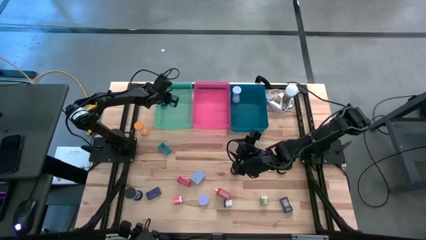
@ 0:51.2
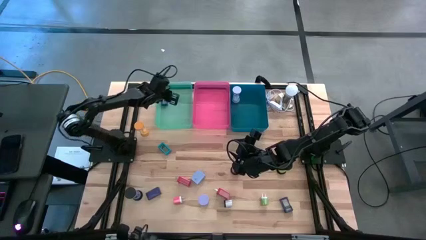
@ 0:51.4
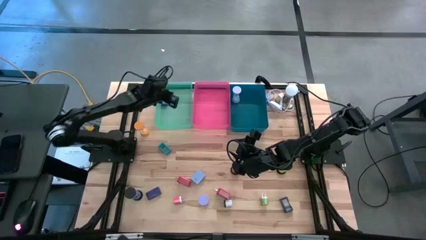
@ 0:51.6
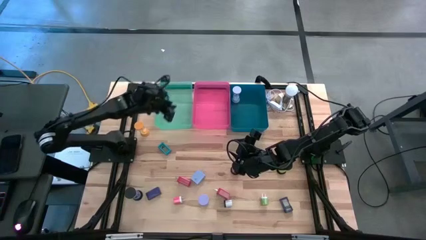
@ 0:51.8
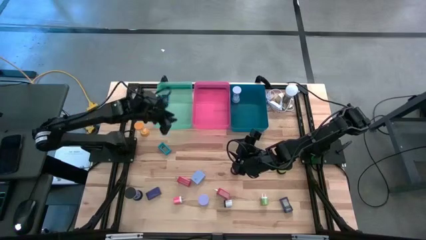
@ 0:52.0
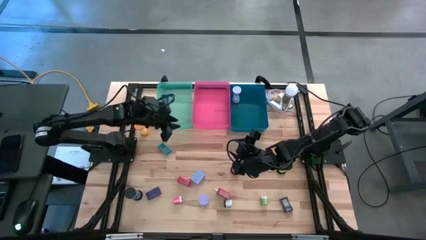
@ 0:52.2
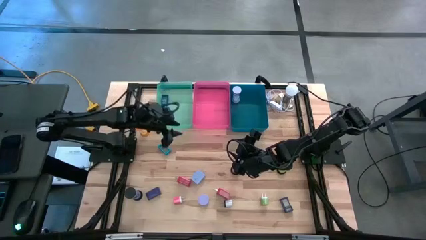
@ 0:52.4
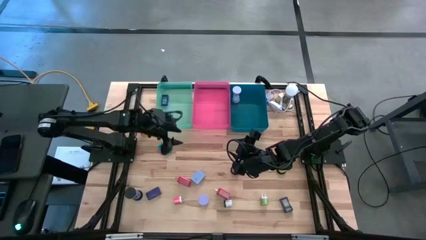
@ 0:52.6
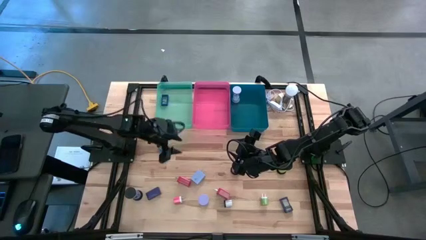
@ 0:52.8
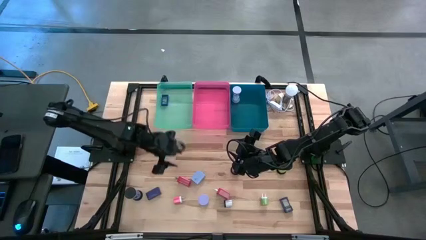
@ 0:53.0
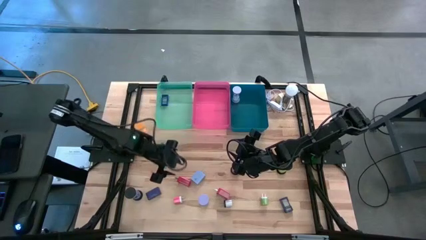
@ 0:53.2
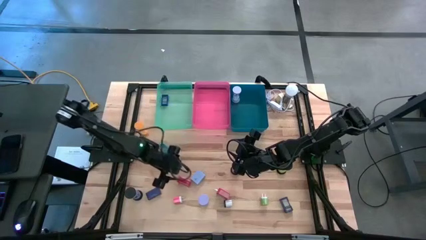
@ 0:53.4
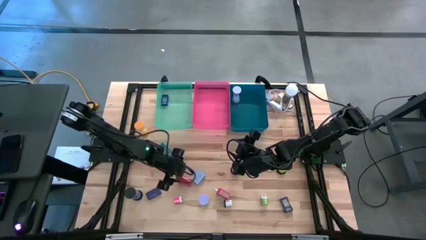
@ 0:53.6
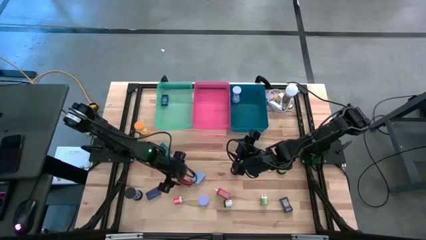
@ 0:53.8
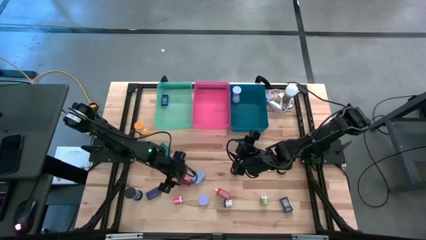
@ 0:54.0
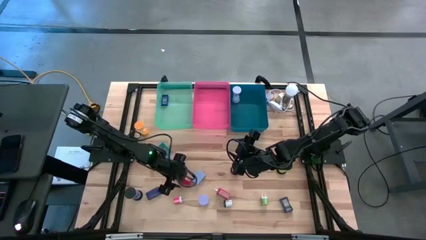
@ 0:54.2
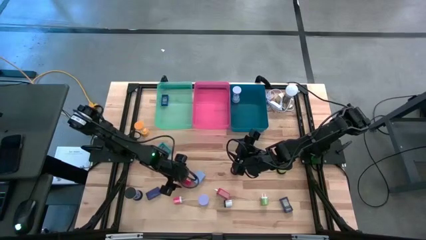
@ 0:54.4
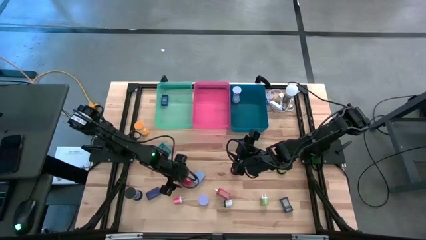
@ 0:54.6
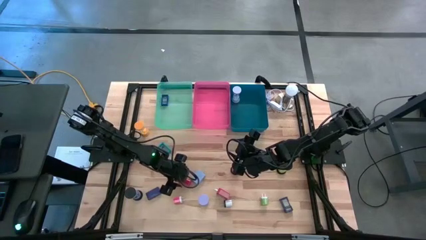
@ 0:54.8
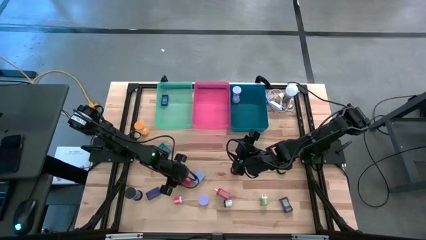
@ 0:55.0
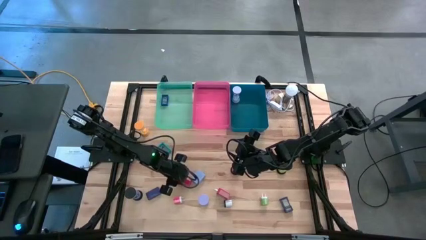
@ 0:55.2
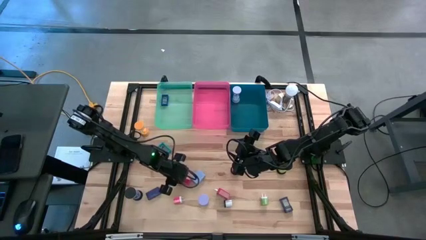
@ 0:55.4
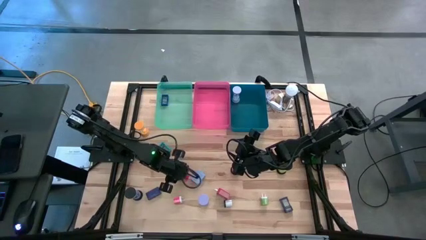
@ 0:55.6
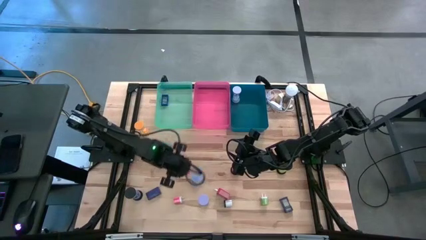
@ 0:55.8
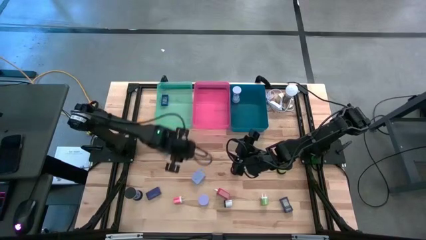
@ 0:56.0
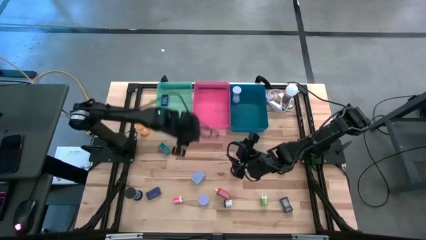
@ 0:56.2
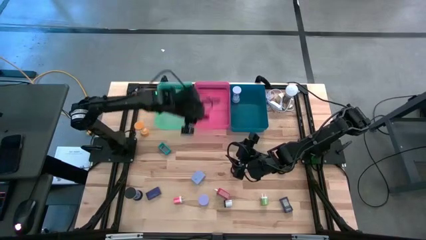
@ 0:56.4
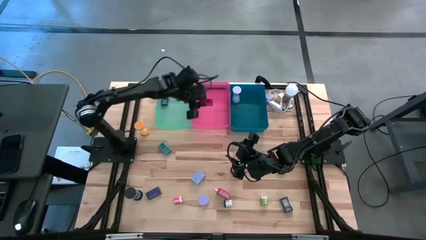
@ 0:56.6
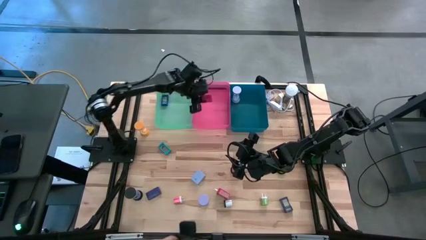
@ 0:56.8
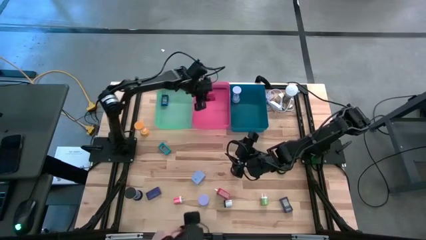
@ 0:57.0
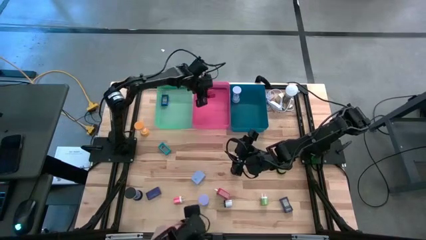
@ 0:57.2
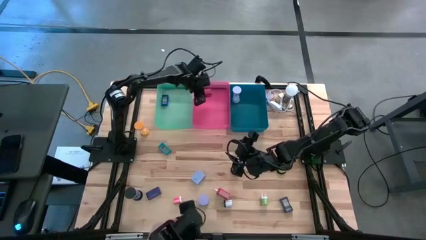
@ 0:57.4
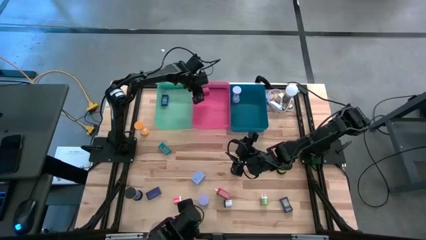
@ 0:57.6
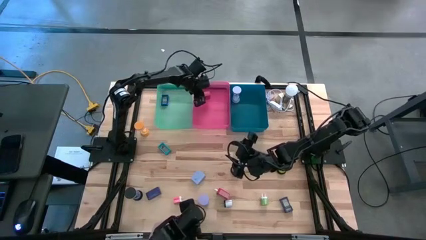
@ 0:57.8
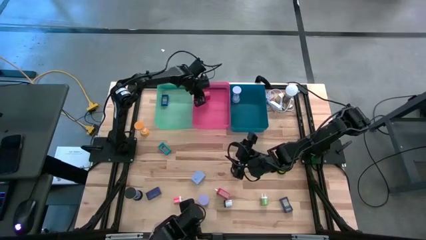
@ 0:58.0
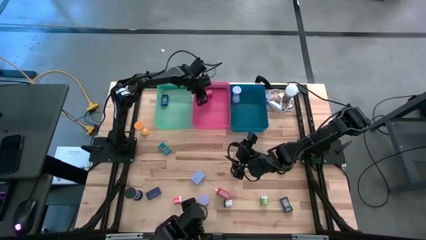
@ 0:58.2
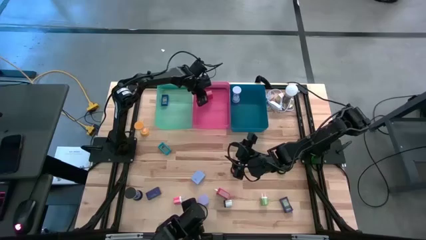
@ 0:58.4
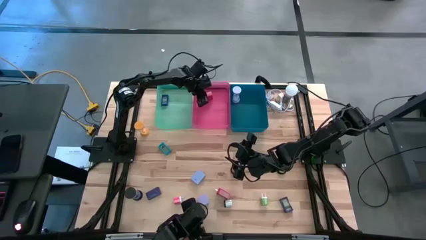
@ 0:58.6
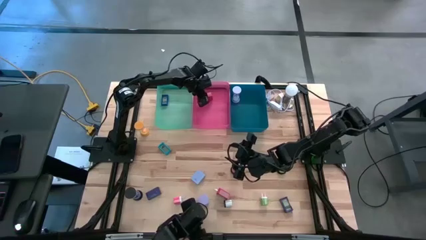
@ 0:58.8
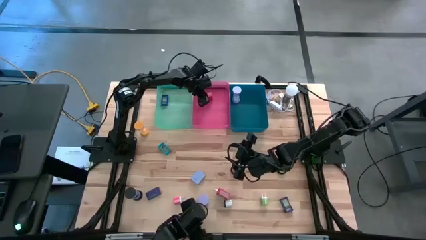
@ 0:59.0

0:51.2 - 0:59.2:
Task: Pick & Place Office items
Put the big red adapter into the red bin

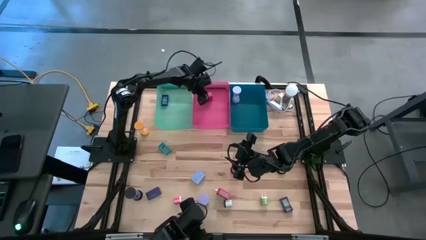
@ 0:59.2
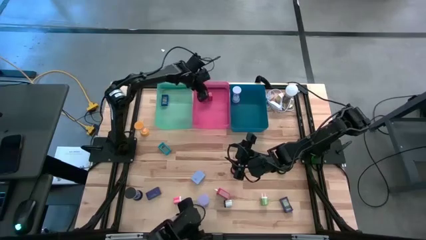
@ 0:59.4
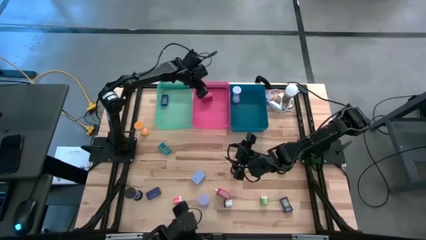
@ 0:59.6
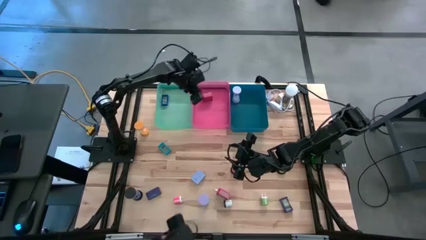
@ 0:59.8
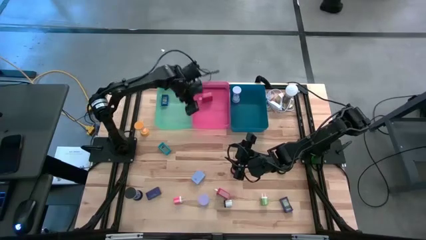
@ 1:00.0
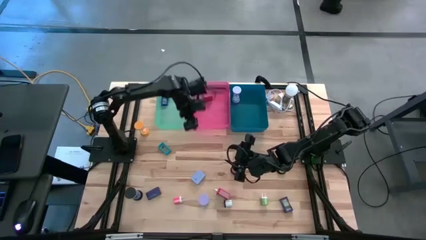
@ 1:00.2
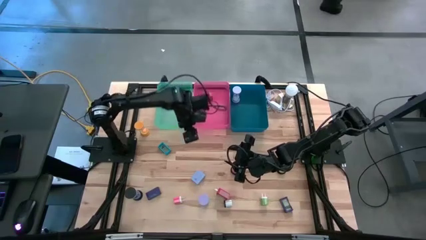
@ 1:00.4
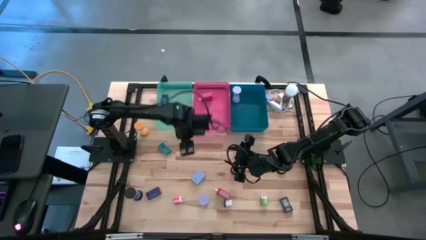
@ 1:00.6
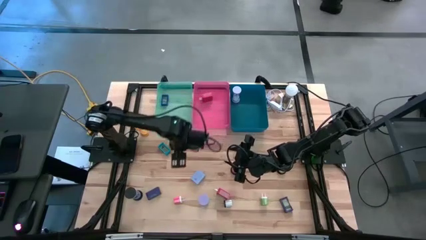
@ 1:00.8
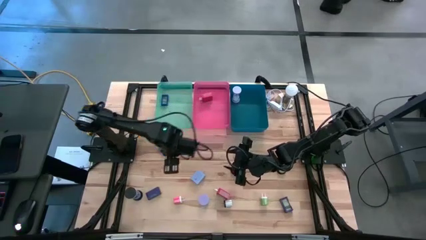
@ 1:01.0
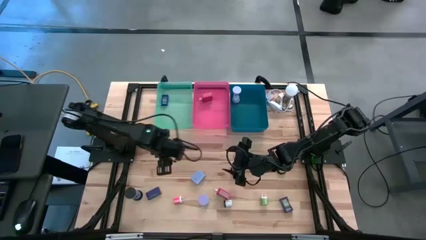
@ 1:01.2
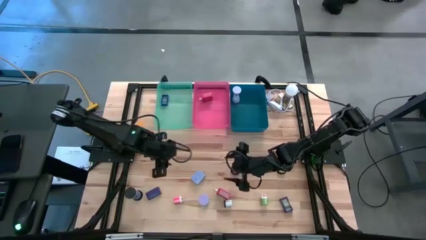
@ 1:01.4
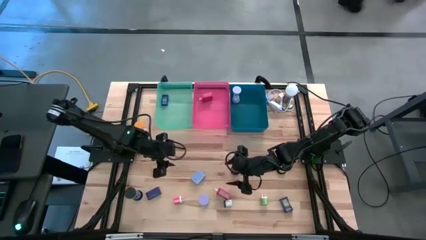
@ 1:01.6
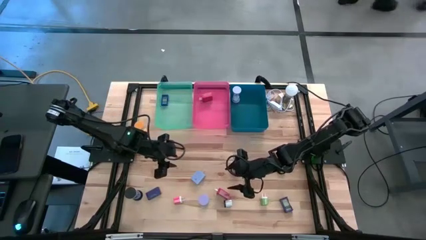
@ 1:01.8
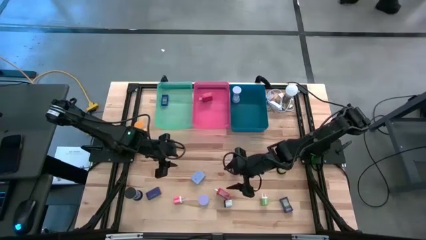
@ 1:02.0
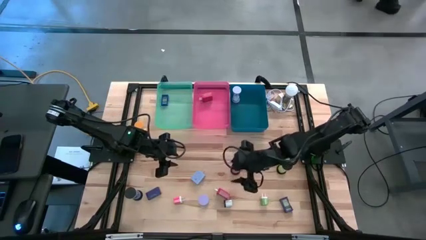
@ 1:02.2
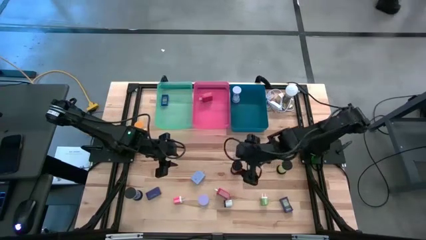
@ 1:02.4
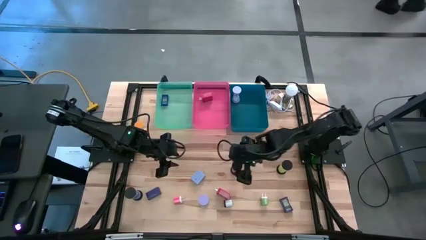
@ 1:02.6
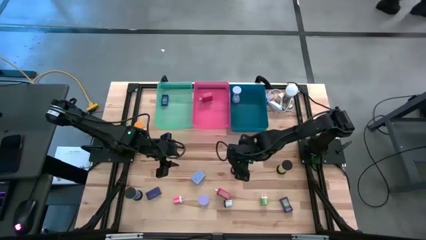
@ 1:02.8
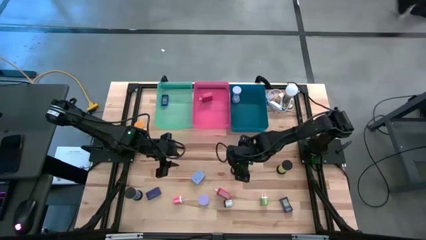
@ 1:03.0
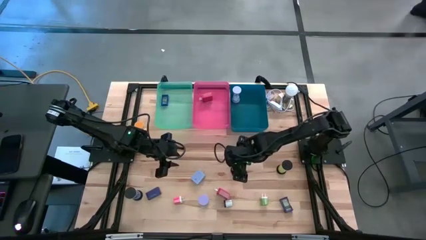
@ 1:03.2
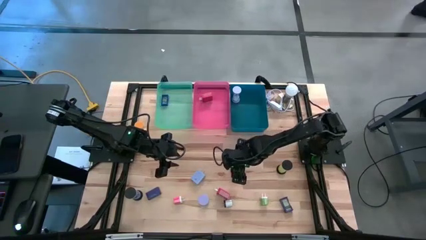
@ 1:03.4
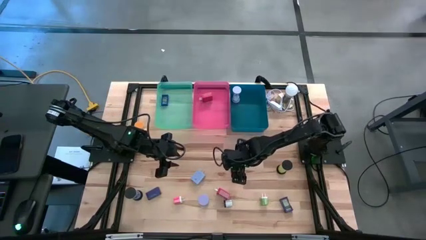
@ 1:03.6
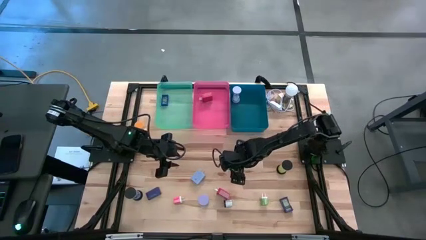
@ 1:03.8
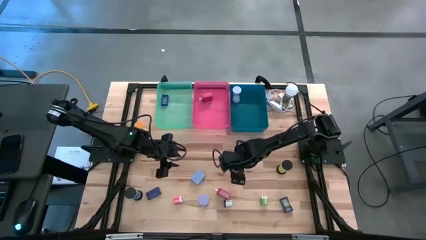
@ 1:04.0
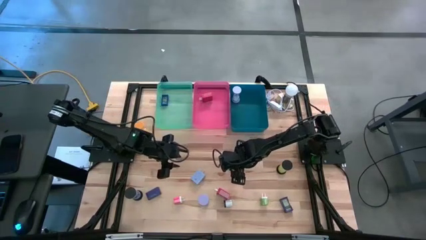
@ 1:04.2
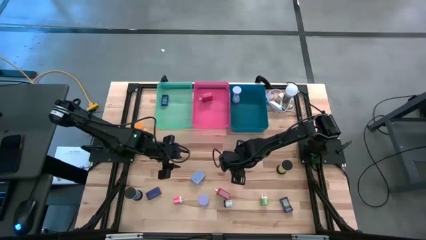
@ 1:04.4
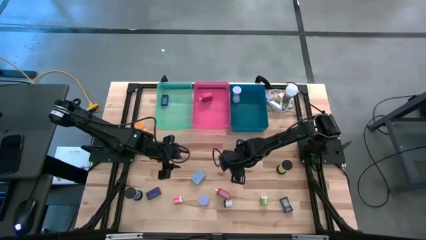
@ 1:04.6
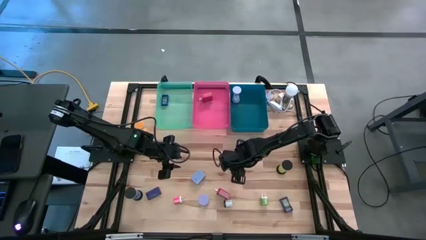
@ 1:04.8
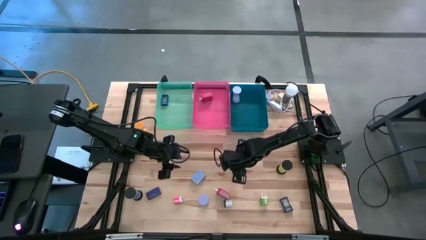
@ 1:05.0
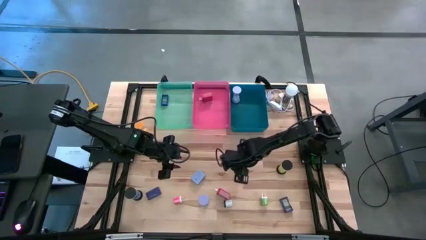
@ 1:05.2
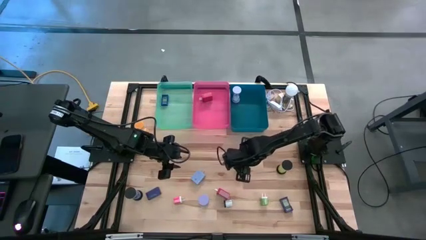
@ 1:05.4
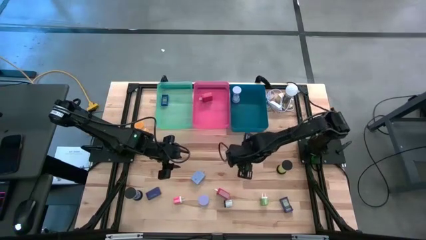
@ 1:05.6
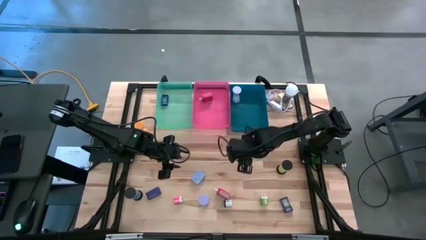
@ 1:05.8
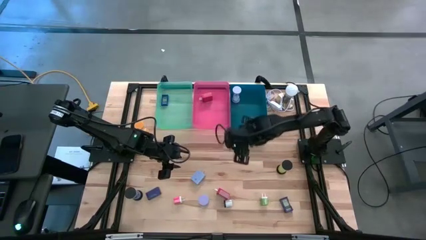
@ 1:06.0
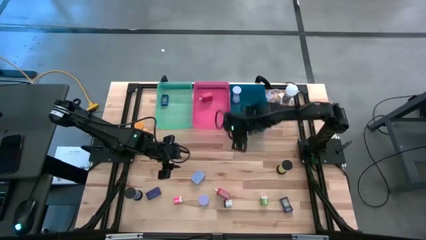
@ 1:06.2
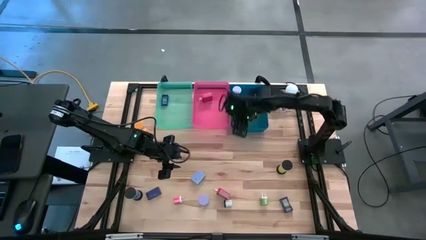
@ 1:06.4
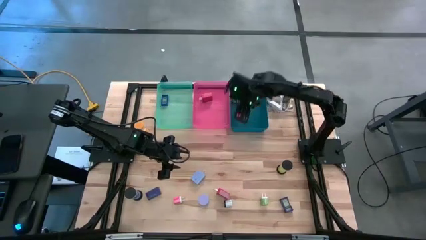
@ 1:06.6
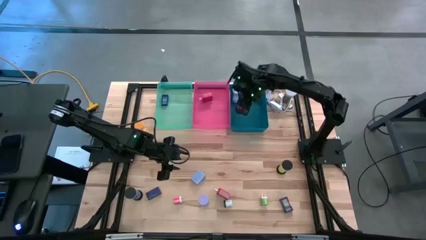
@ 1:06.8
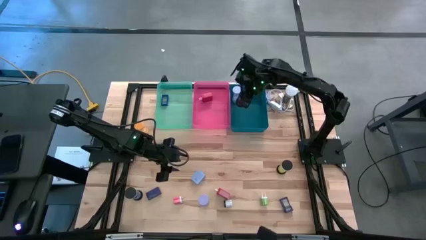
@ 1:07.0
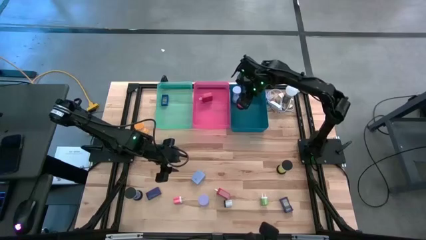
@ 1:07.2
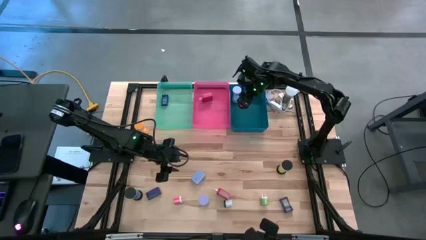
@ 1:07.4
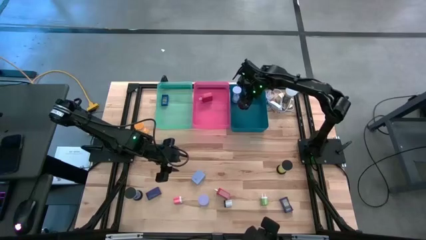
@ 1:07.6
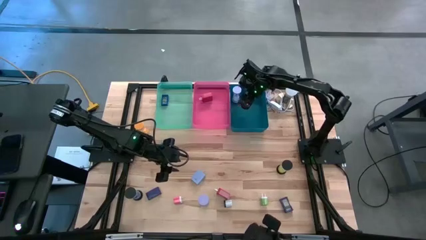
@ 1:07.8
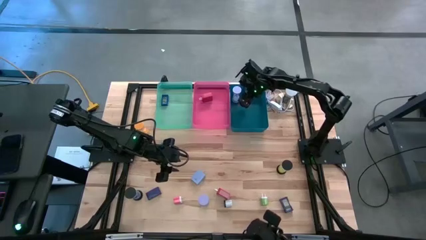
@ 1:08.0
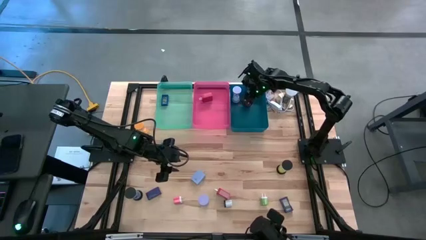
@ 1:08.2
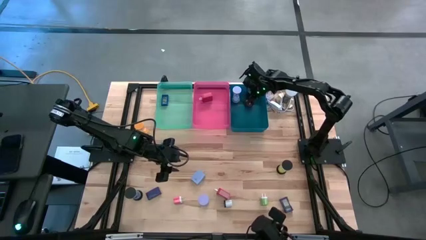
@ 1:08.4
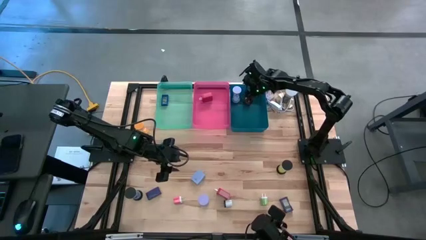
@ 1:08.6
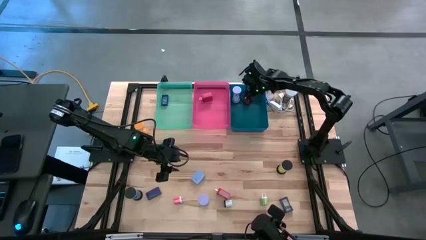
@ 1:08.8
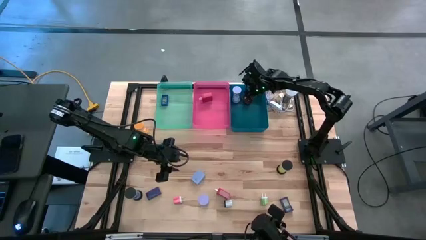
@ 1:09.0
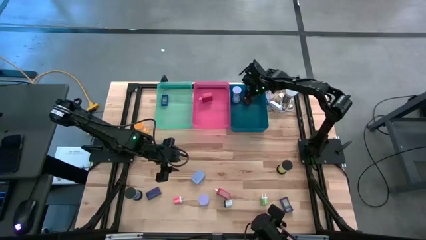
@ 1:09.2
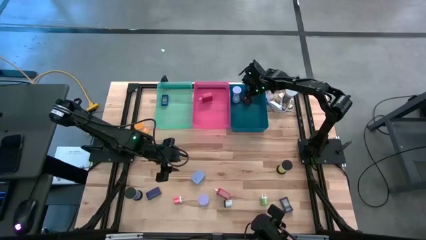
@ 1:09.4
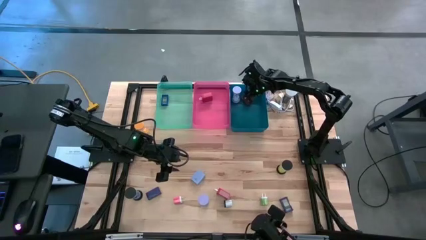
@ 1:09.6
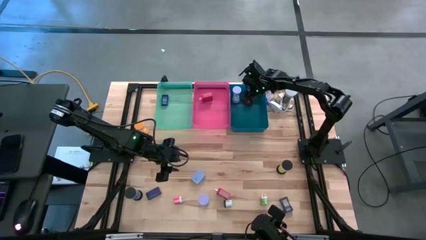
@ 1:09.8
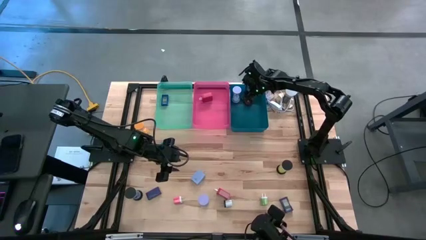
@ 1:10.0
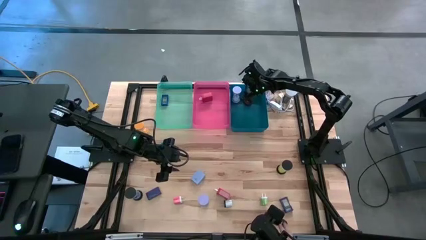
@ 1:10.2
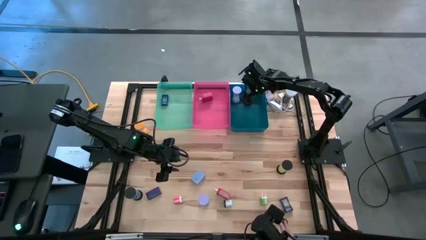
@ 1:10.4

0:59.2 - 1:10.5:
Put the red hourglass into the dark blue bin
